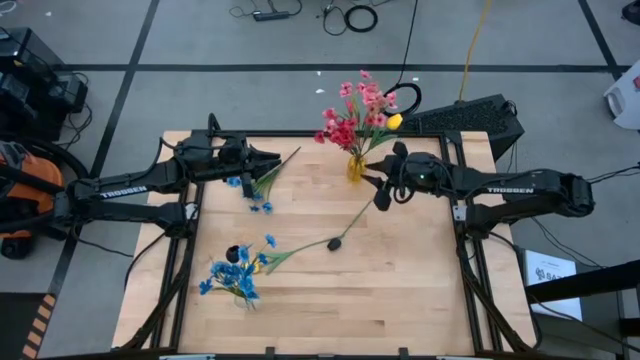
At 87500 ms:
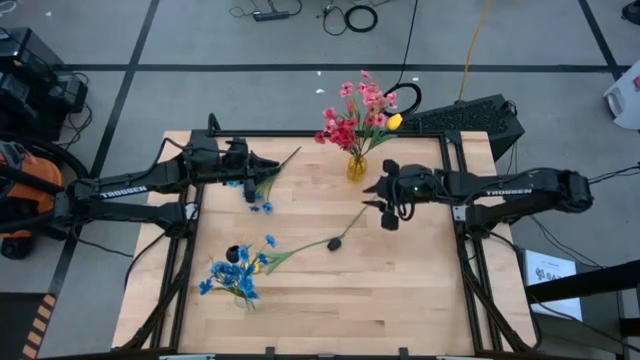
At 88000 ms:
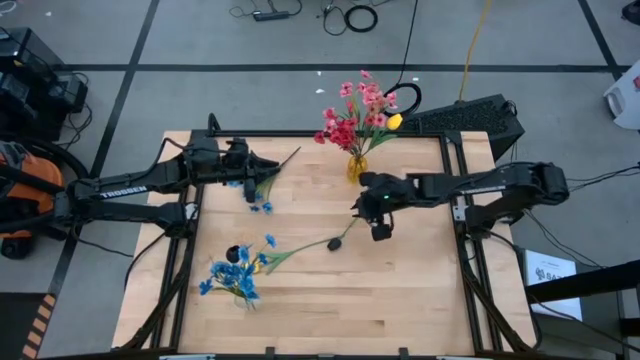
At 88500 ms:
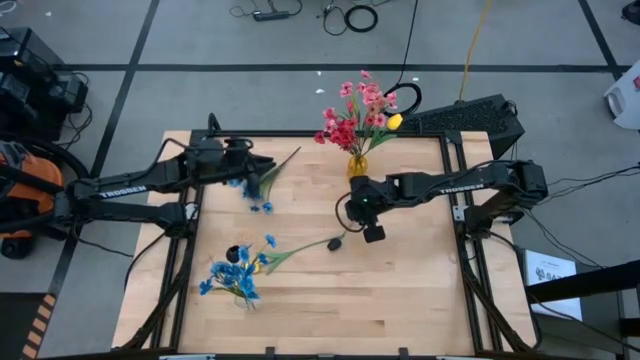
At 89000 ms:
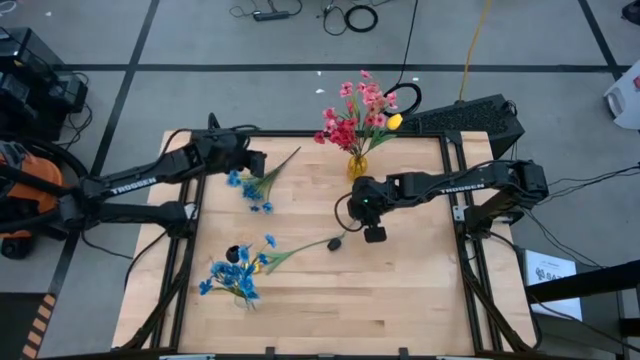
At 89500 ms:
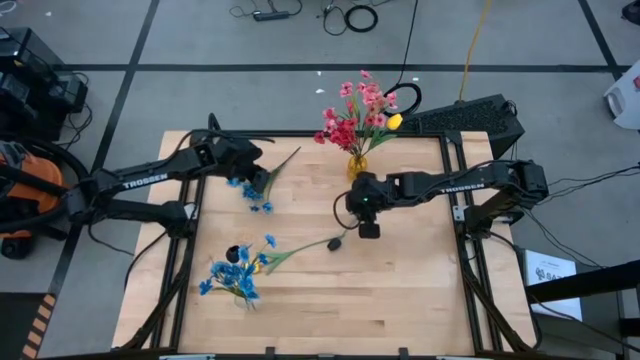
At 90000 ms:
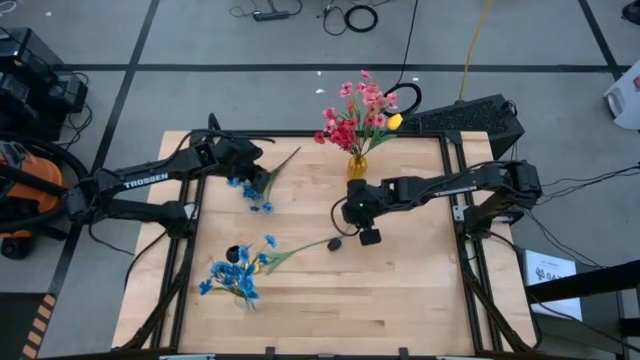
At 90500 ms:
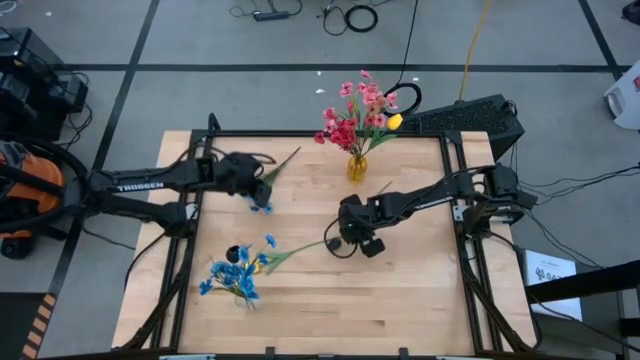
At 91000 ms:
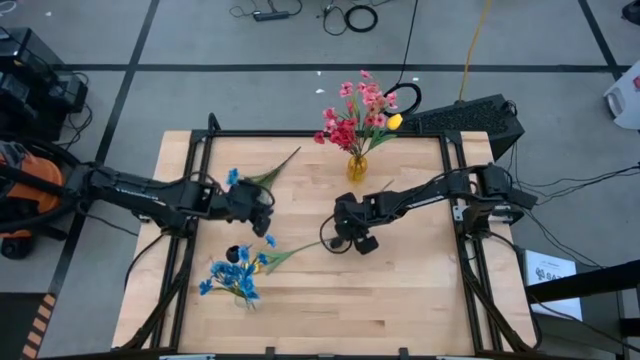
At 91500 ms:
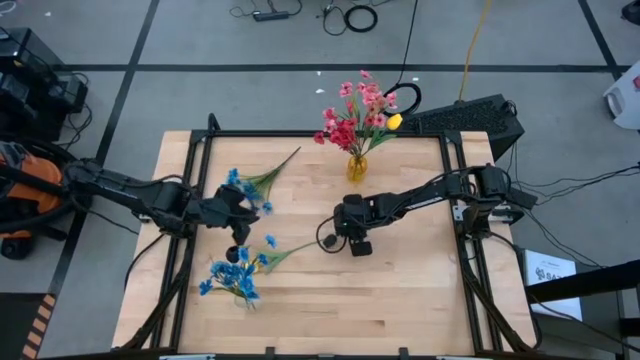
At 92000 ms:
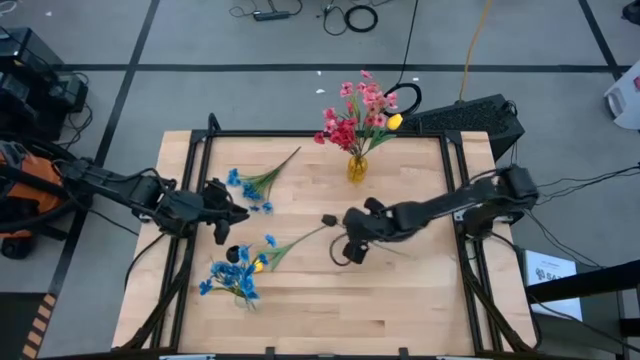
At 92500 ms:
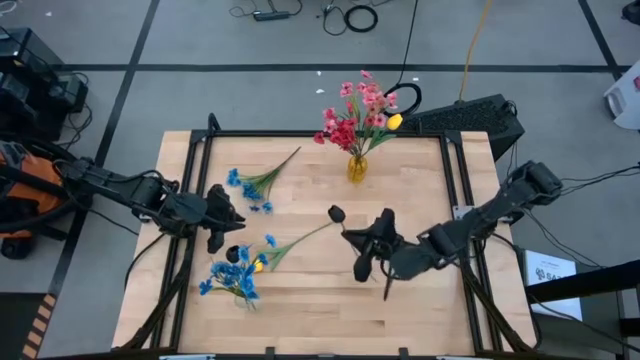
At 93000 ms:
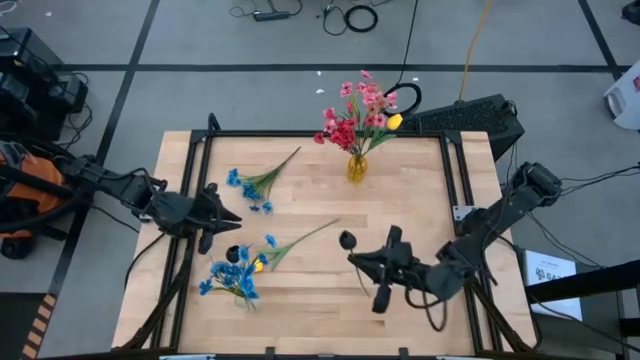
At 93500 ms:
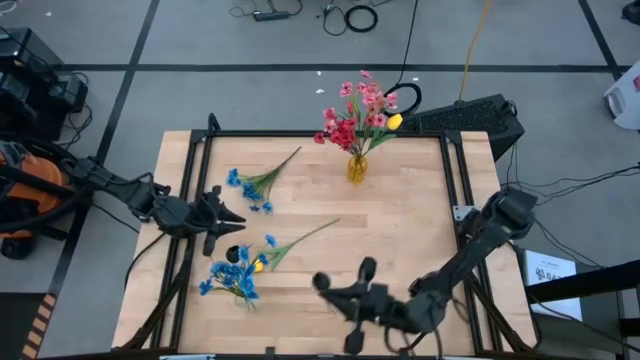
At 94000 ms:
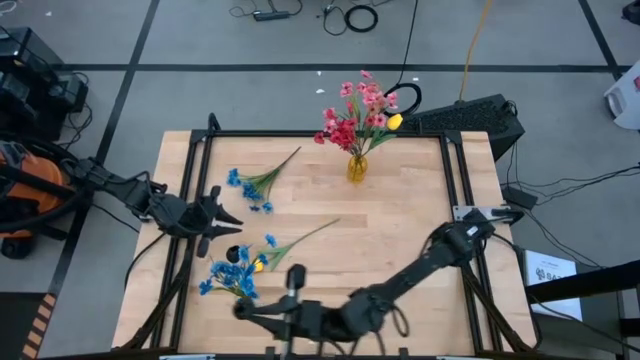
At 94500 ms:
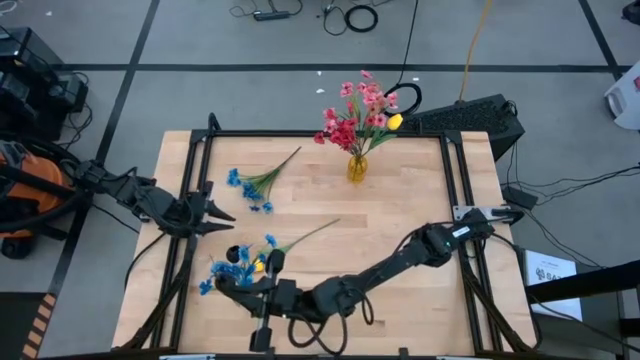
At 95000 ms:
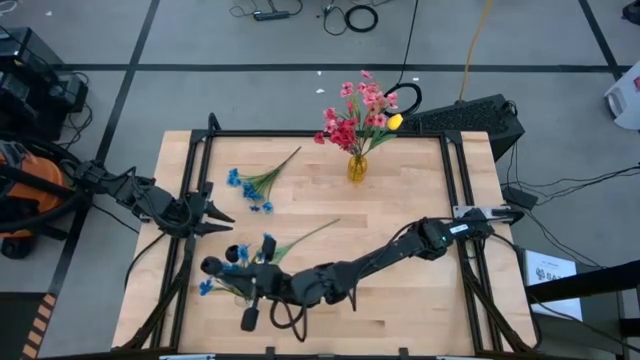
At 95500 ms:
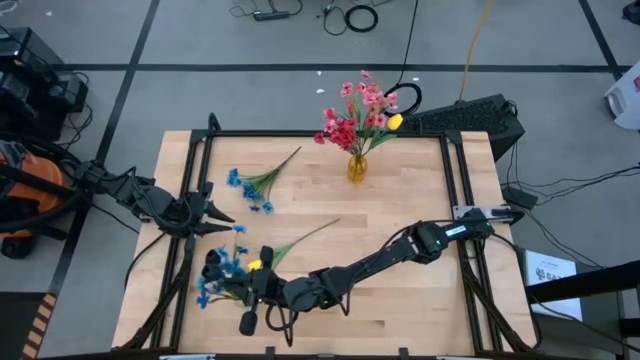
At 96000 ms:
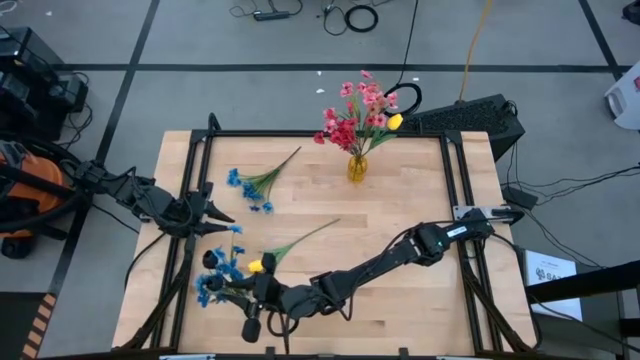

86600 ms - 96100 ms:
Task: Sort flowers into vase by color
Put the black flower into the transparent vase

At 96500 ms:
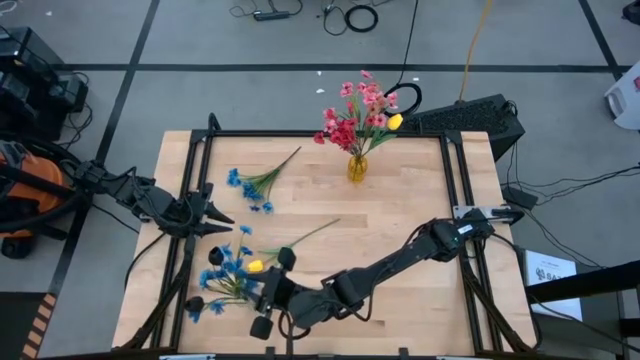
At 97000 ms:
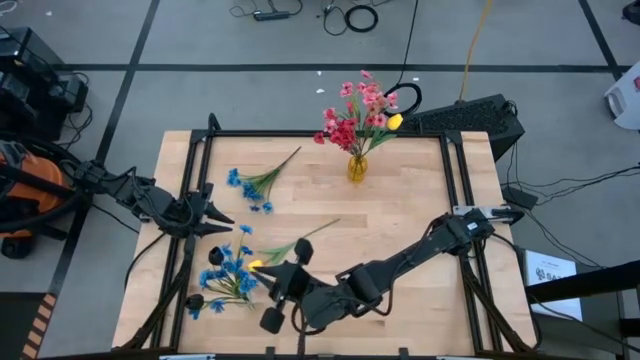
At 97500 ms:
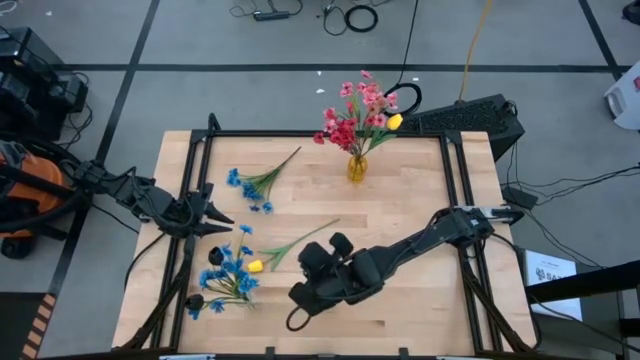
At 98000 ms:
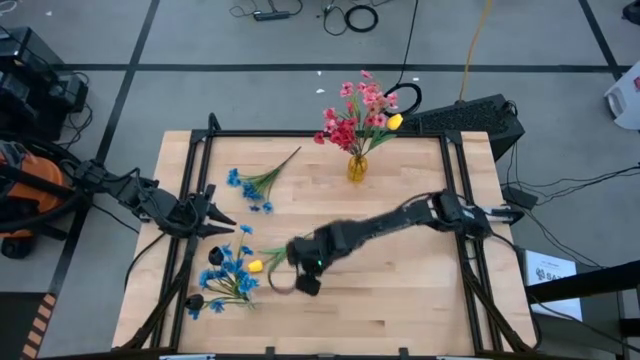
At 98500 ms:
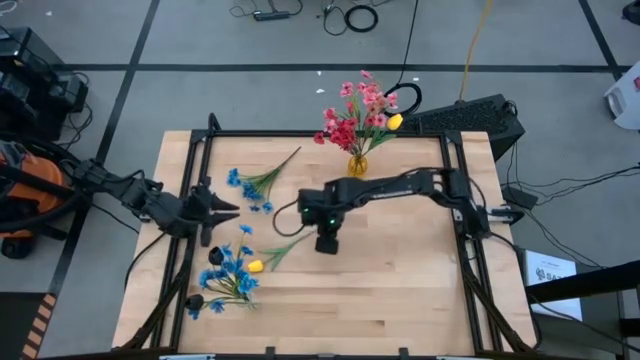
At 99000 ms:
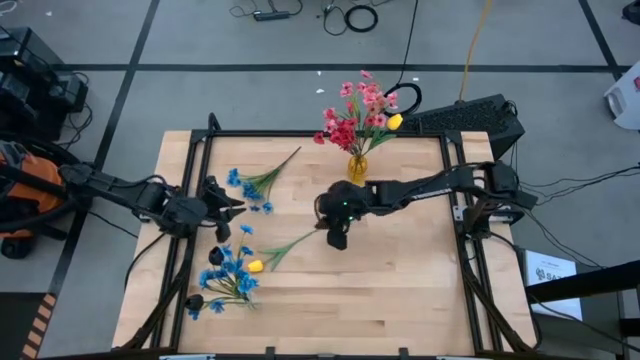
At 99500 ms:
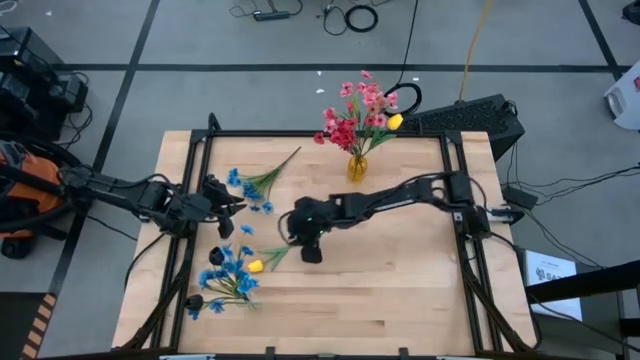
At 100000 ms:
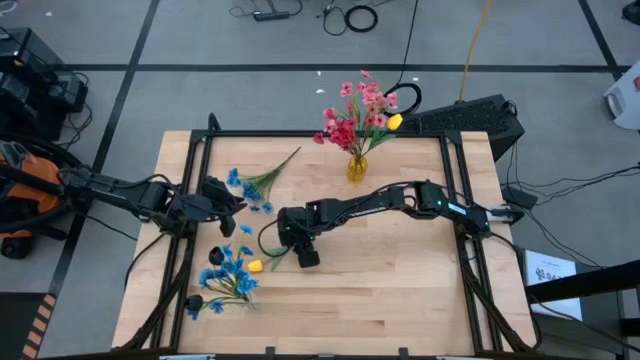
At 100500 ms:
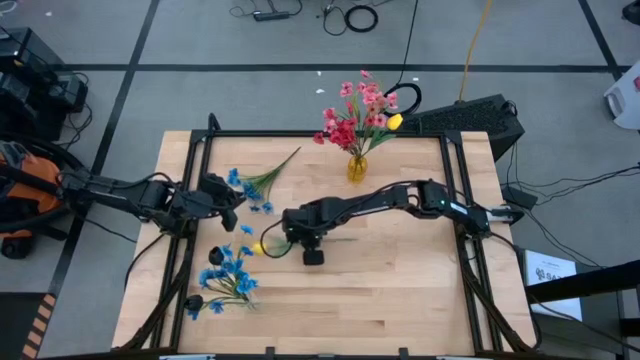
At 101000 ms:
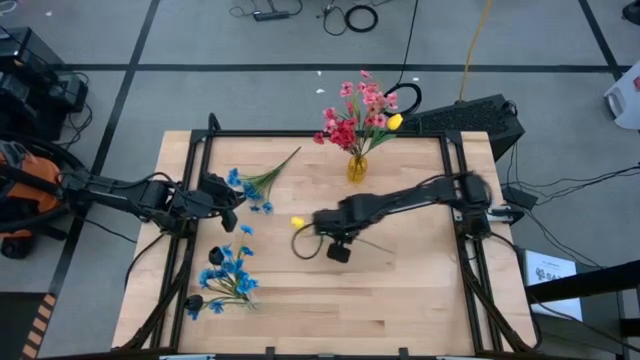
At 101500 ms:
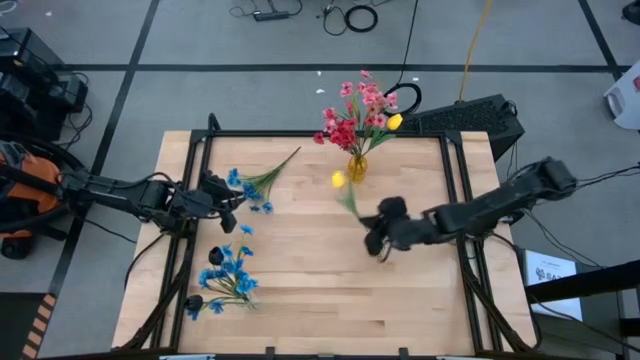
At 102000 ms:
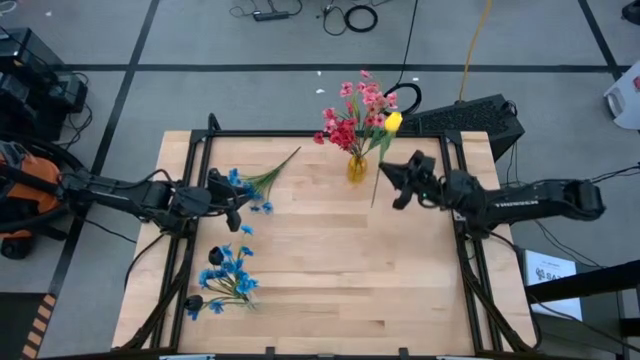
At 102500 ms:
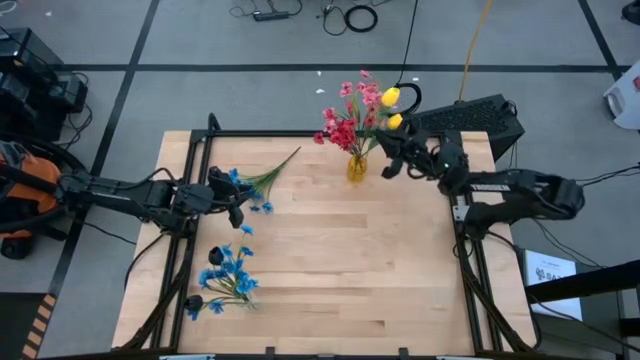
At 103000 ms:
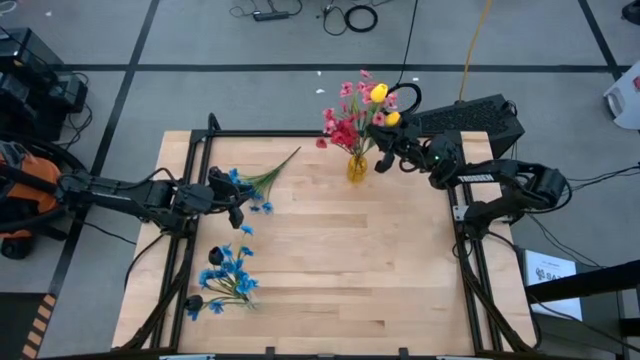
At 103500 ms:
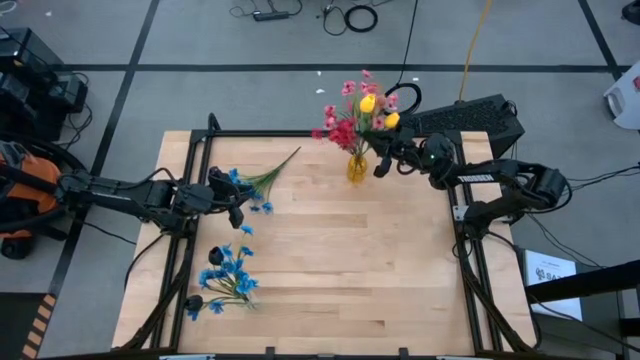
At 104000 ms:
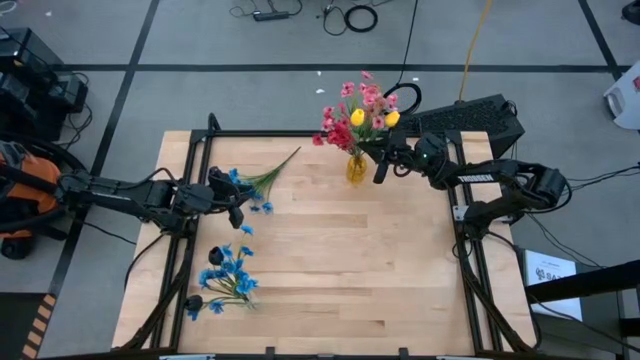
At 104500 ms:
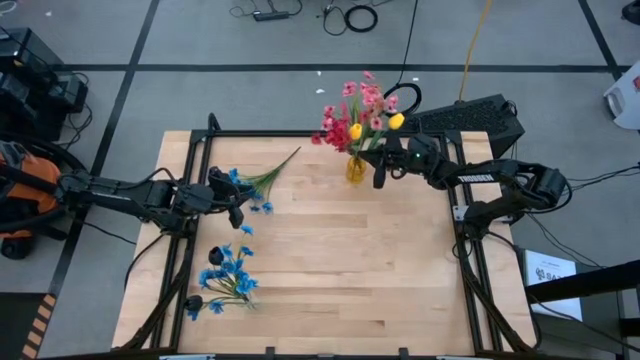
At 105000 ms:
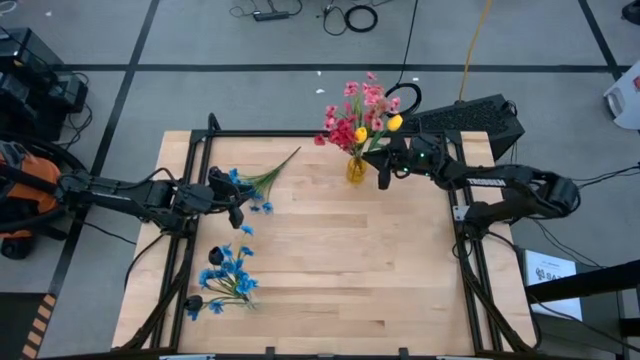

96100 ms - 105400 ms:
Put the yellow flower into the yellow vase

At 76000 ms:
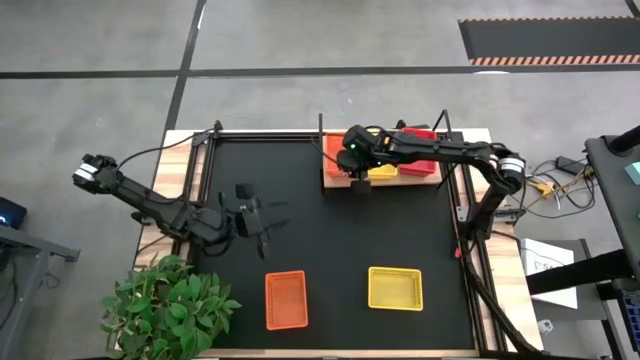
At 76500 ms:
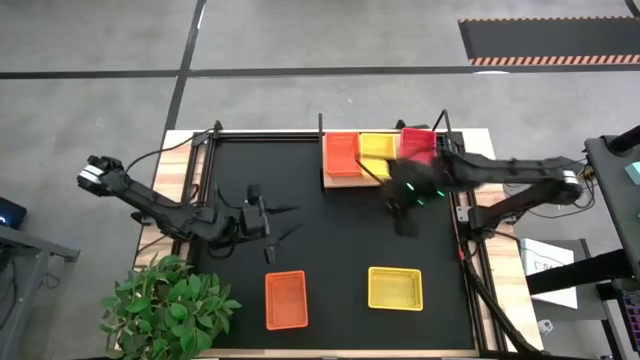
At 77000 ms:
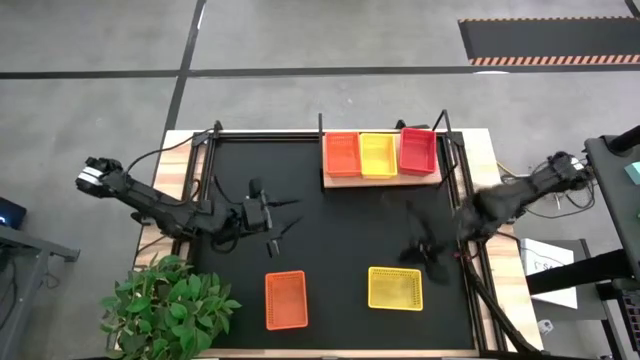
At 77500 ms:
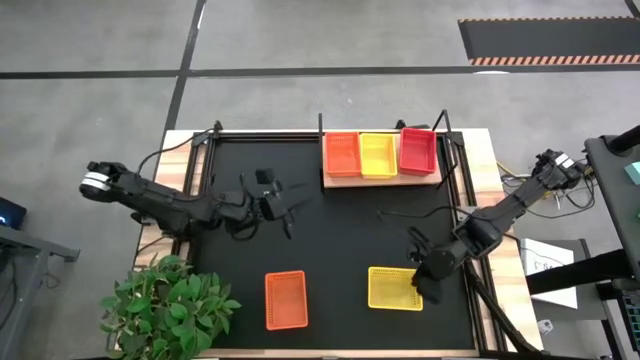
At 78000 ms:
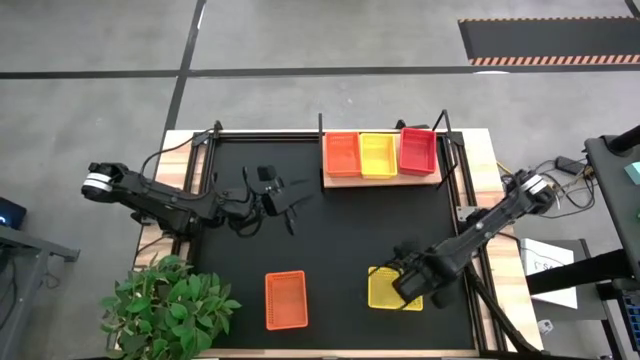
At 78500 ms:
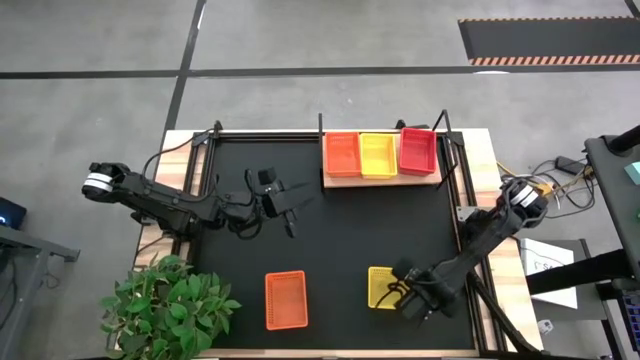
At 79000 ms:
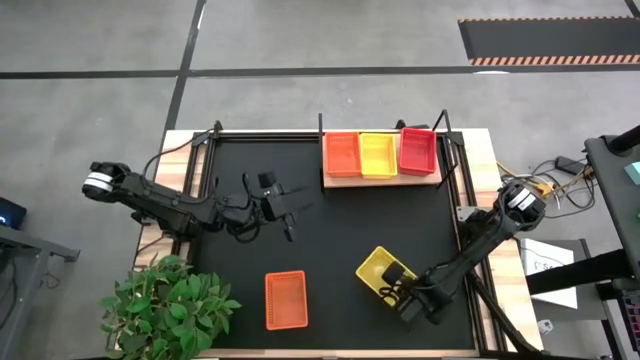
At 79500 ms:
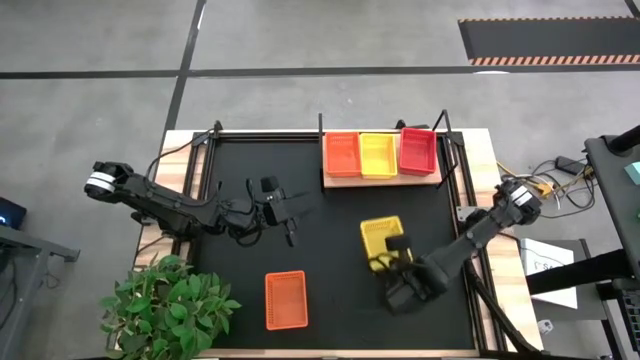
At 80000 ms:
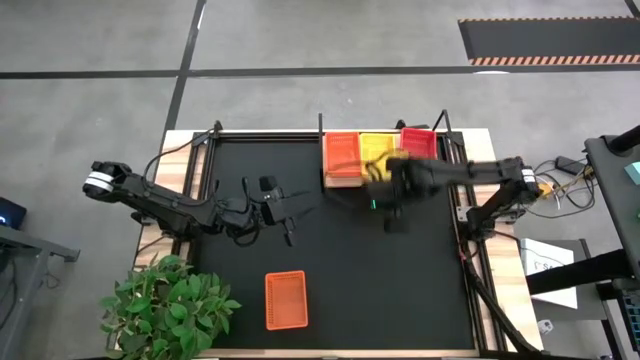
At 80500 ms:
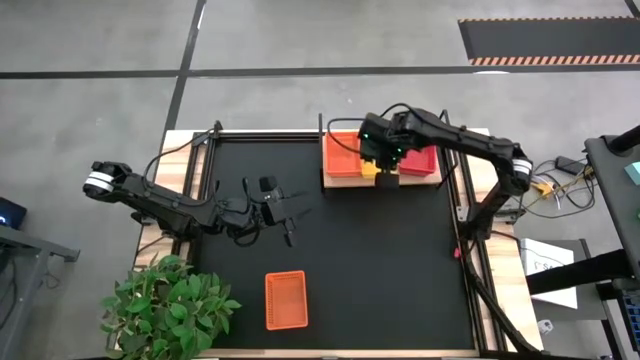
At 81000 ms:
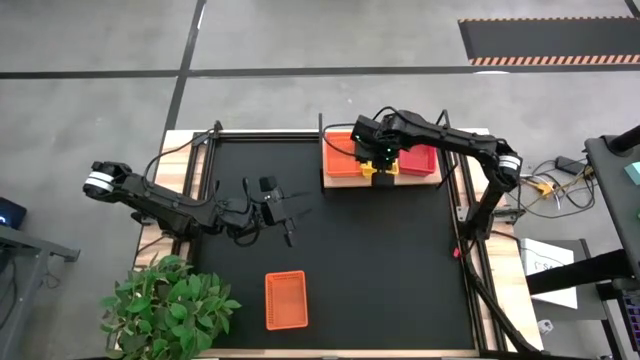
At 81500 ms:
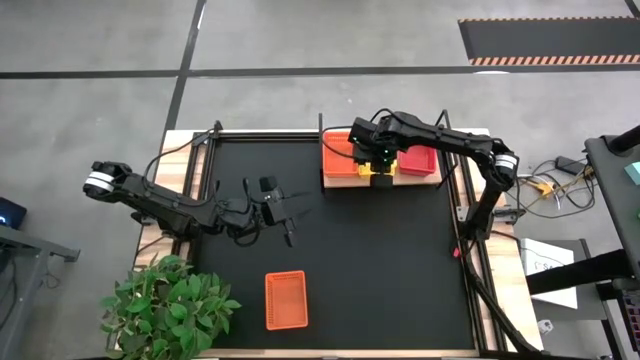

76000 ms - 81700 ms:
Task: Stack baskets on shelf by color
Stack the yellow bin on the stacked yellow bins on the shelf
